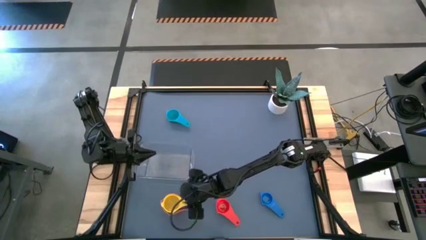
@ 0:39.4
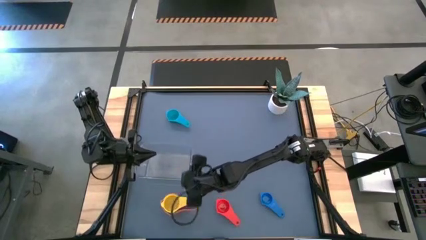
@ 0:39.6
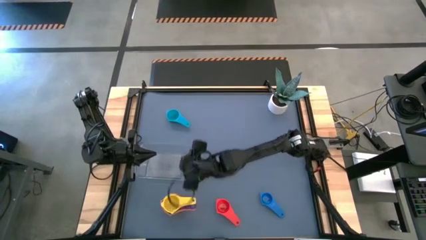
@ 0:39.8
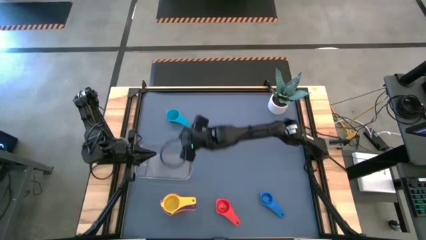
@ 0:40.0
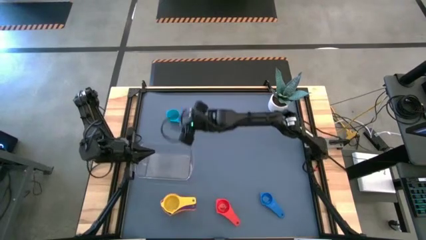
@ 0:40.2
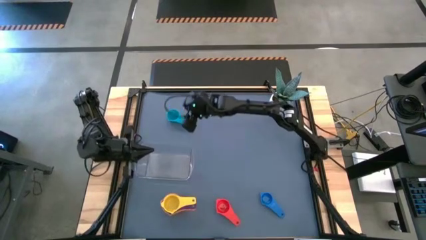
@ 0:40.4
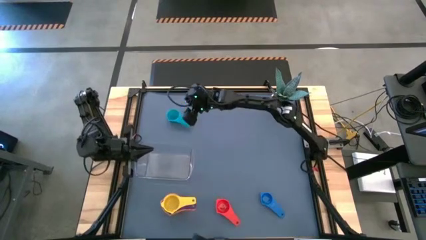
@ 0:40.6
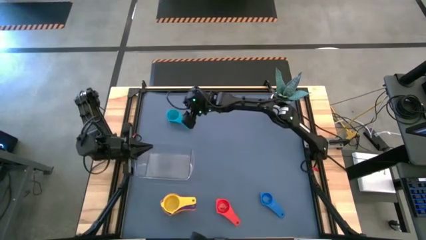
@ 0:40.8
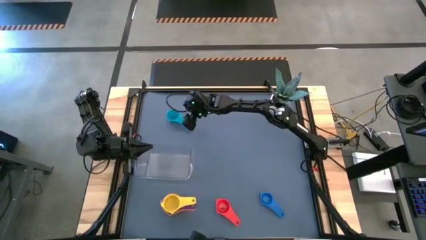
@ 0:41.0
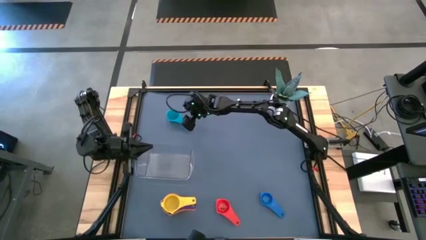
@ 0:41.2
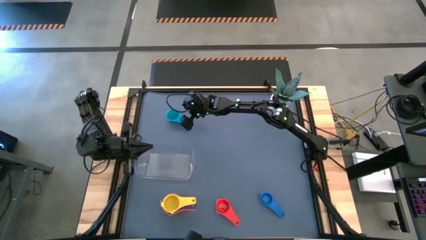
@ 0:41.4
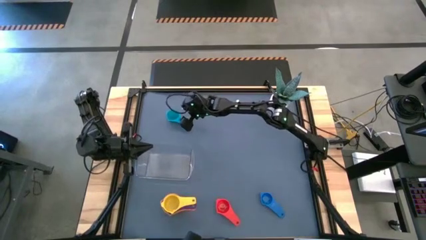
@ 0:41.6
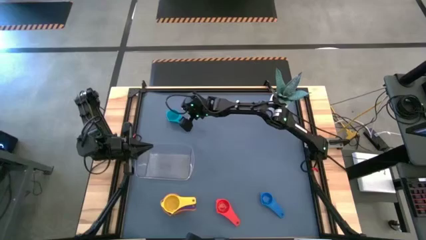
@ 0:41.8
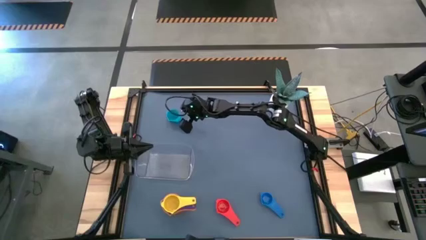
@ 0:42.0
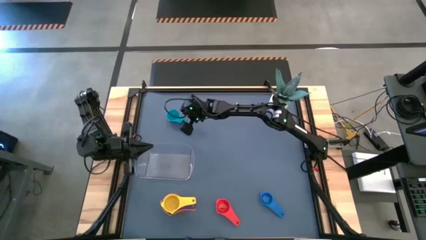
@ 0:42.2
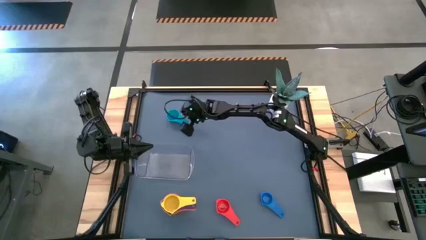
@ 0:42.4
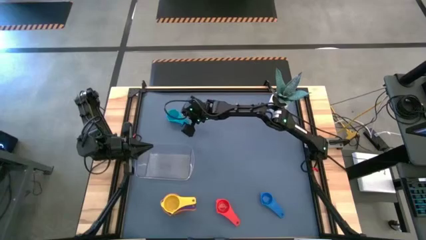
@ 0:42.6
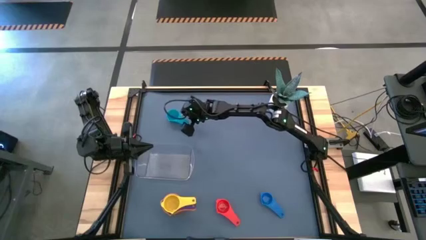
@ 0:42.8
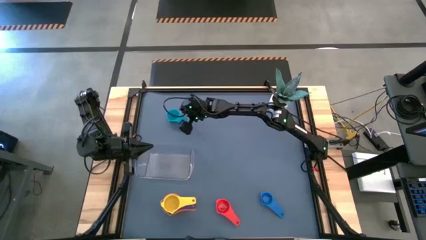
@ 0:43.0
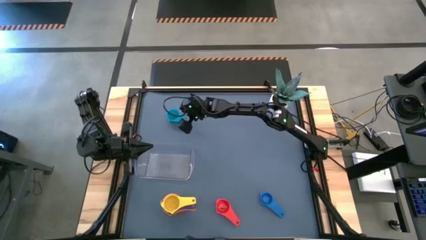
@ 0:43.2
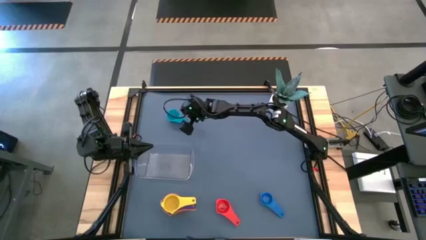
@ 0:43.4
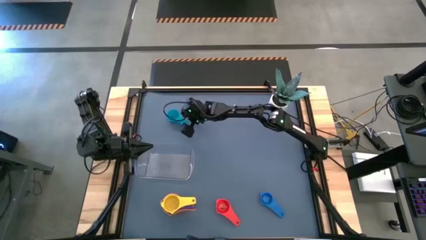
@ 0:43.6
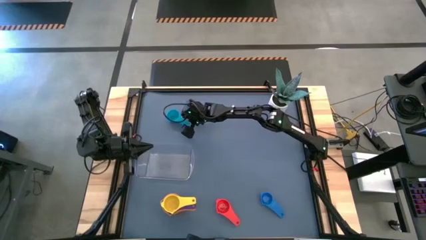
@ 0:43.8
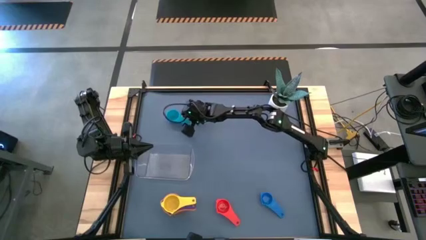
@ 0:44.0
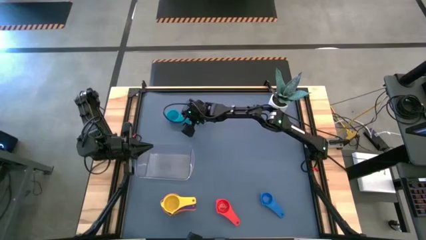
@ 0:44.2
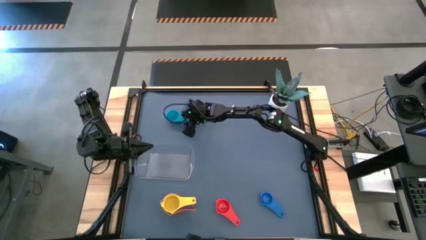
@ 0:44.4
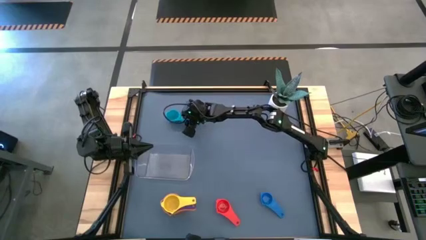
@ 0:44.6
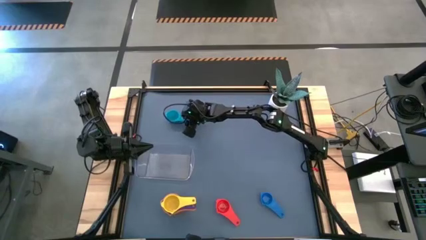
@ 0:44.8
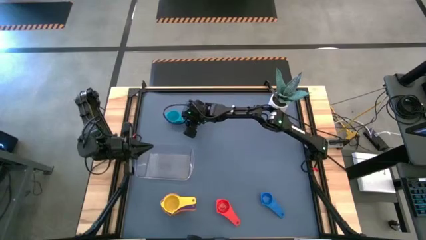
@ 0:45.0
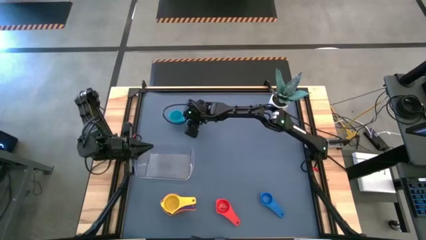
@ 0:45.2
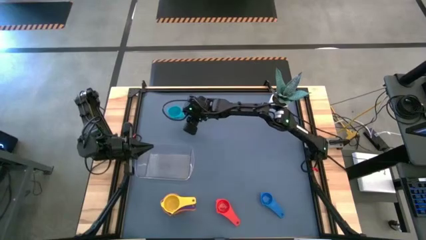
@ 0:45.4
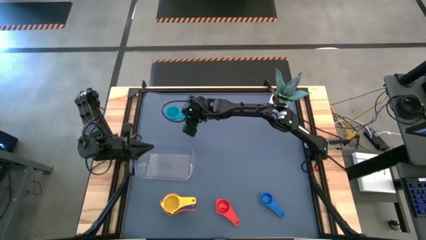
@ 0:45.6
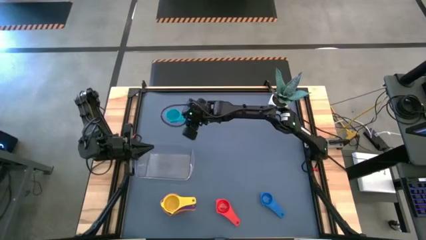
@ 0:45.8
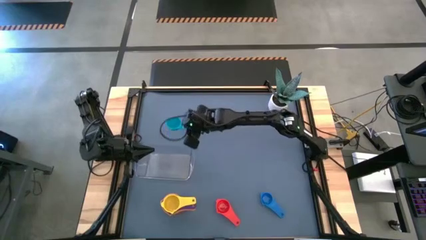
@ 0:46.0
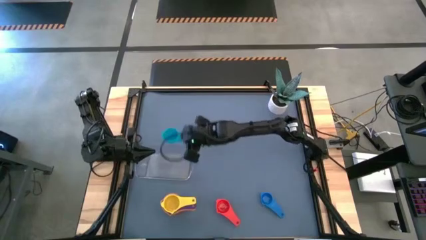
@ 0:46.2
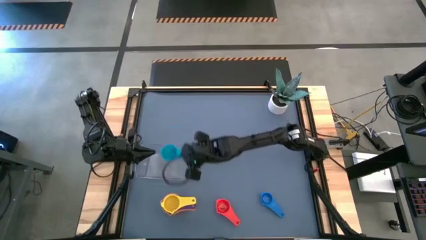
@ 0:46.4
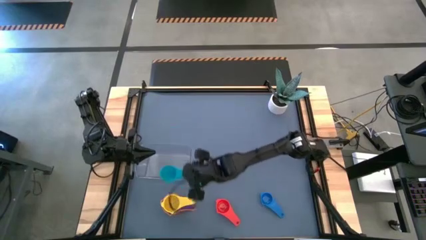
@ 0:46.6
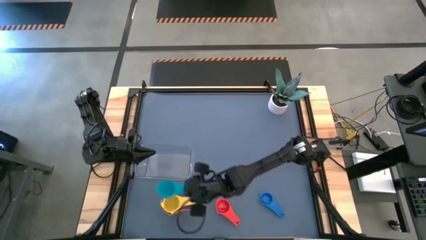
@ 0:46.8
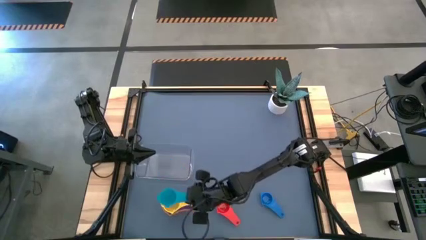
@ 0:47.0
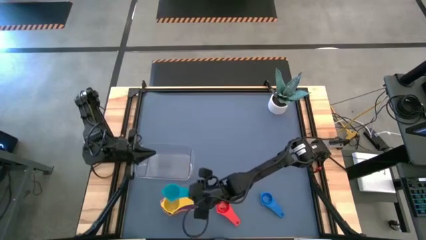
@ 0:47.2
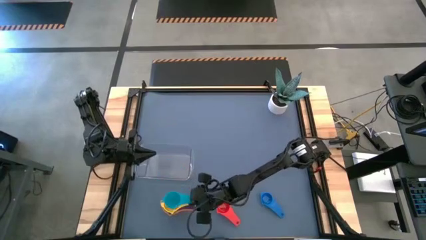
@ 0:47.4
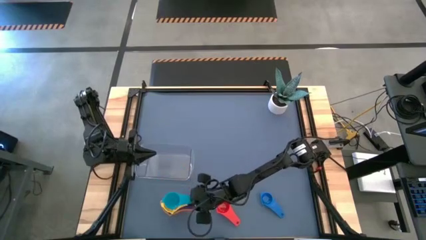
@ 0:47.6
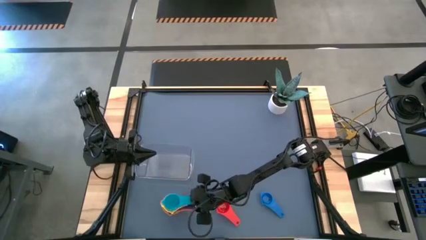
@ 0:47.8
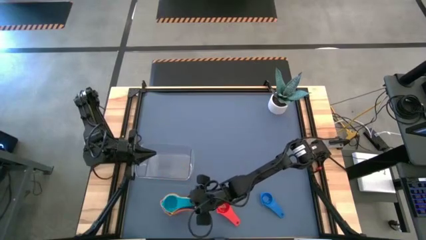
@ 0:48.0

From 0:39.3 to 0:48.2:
Task: Nest measuring cups in basket
Stack the light blue measuring cup on top of the yellow measuring cup

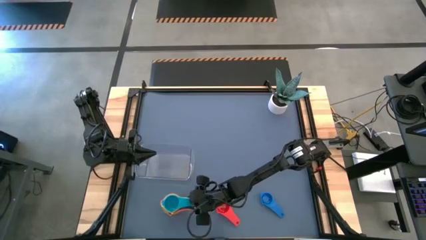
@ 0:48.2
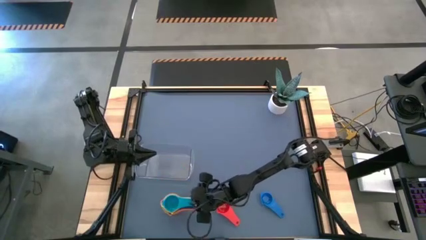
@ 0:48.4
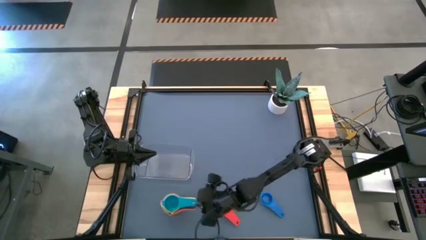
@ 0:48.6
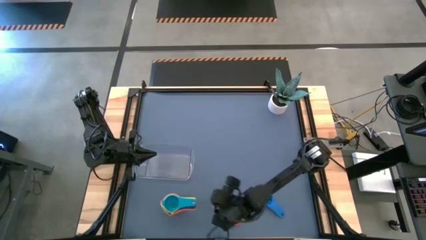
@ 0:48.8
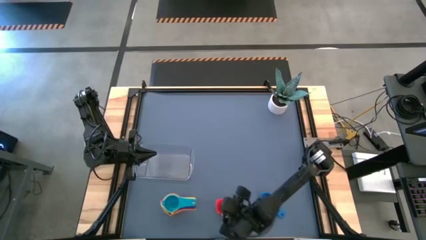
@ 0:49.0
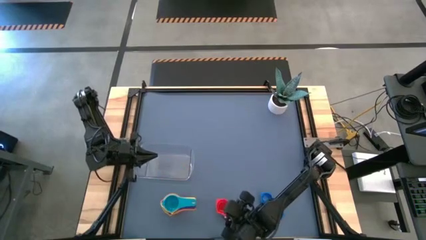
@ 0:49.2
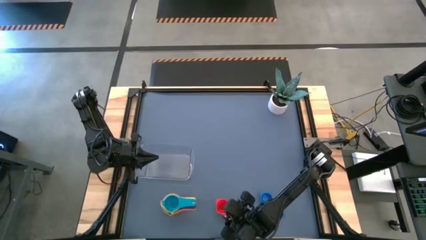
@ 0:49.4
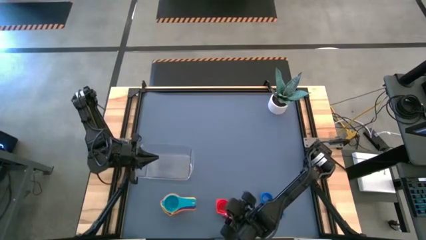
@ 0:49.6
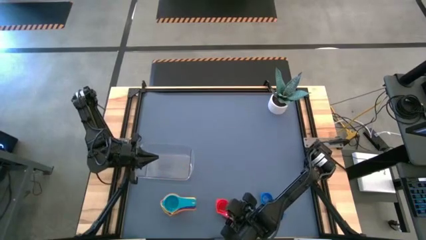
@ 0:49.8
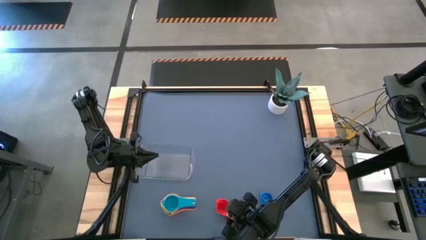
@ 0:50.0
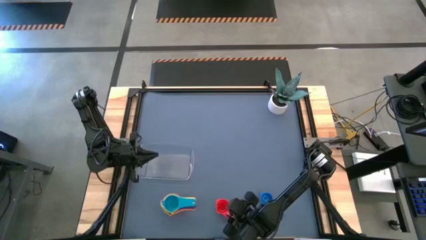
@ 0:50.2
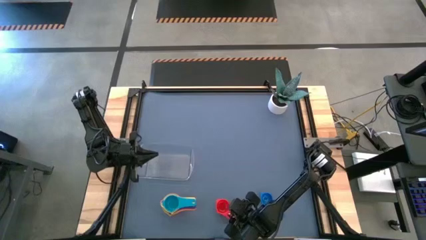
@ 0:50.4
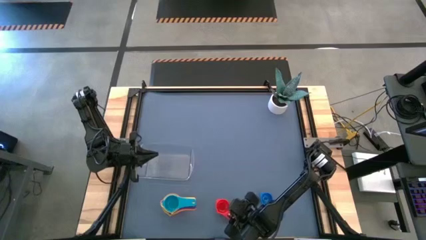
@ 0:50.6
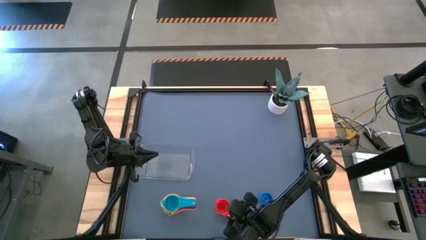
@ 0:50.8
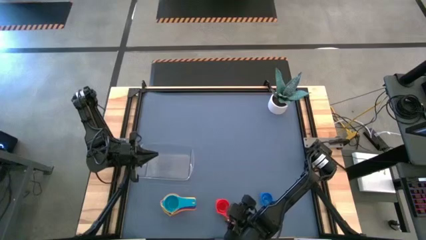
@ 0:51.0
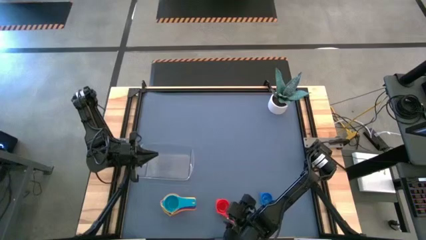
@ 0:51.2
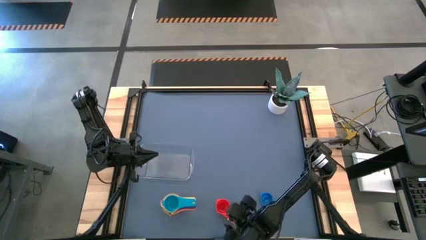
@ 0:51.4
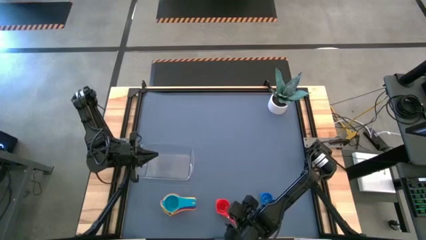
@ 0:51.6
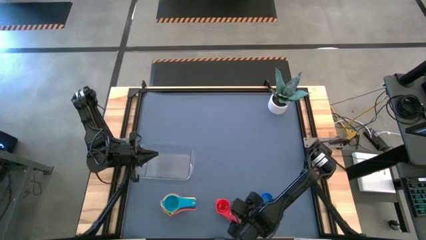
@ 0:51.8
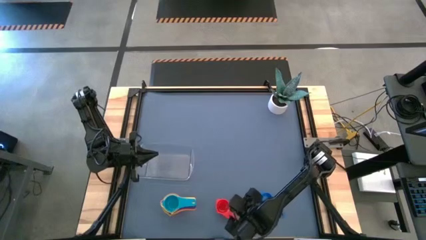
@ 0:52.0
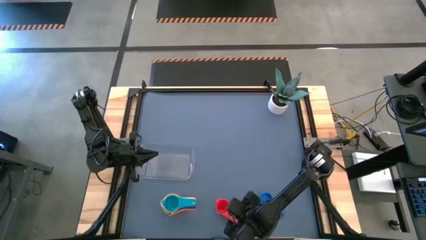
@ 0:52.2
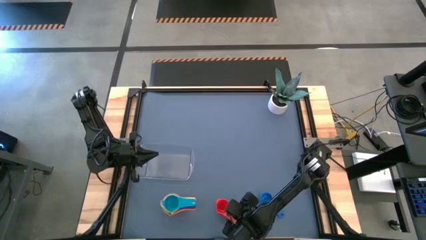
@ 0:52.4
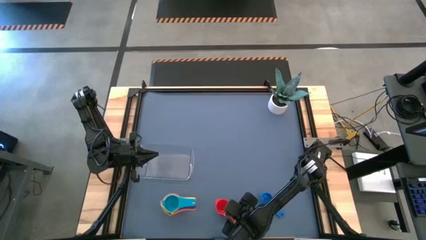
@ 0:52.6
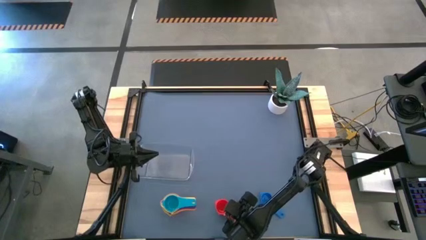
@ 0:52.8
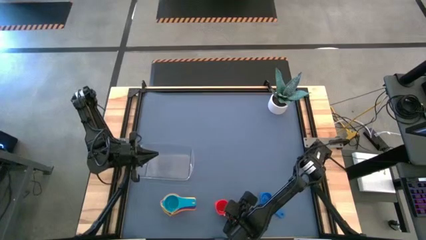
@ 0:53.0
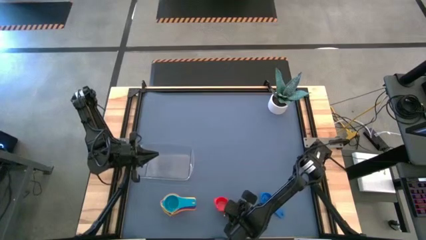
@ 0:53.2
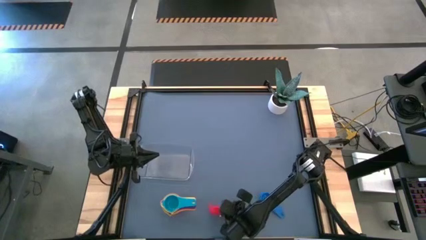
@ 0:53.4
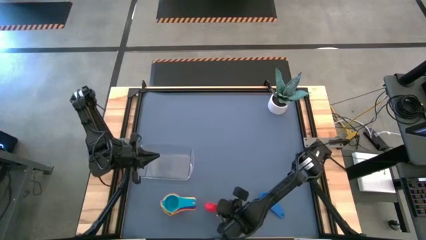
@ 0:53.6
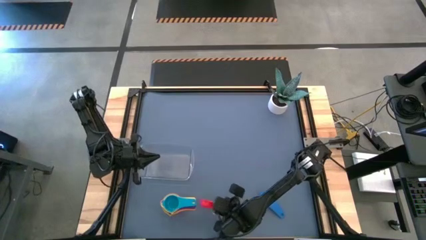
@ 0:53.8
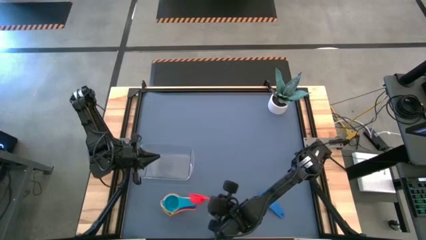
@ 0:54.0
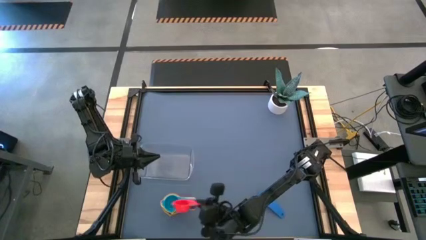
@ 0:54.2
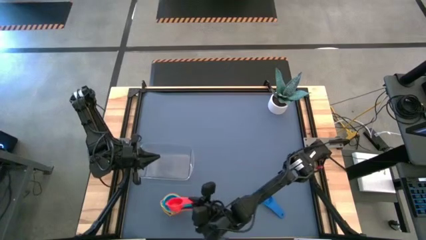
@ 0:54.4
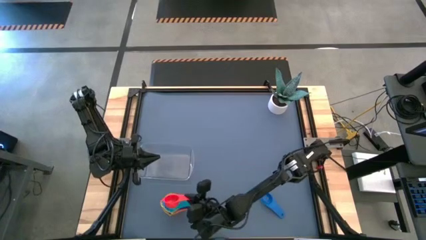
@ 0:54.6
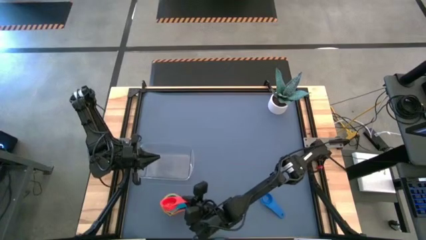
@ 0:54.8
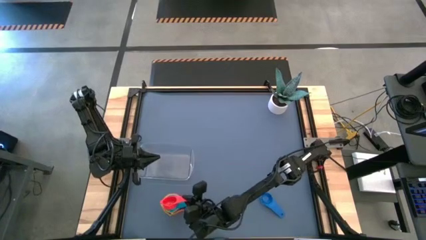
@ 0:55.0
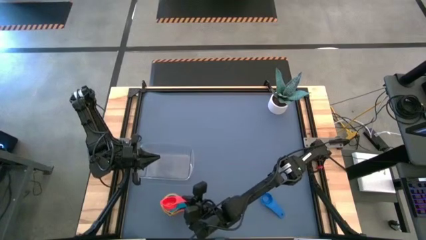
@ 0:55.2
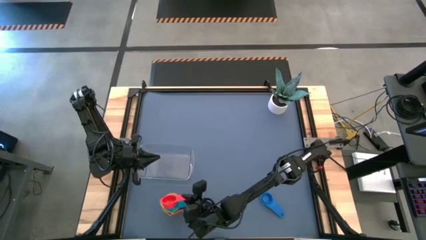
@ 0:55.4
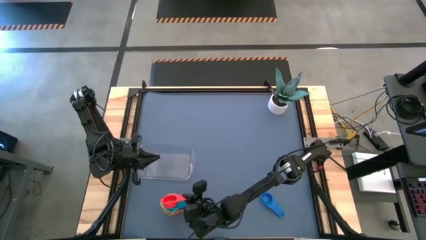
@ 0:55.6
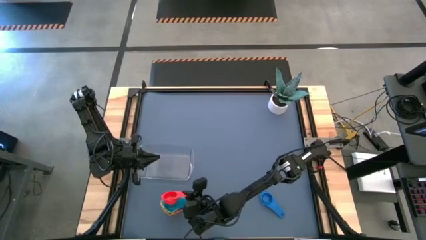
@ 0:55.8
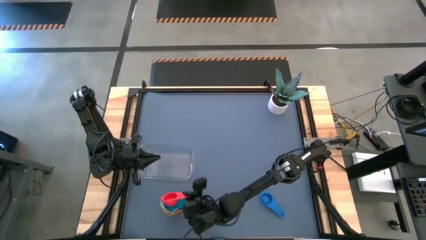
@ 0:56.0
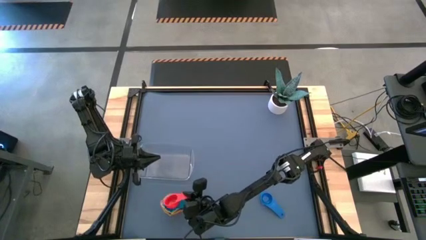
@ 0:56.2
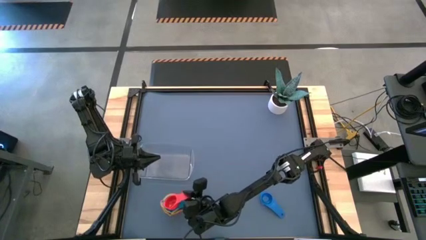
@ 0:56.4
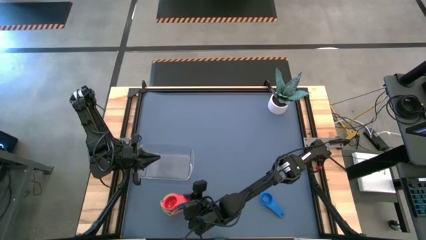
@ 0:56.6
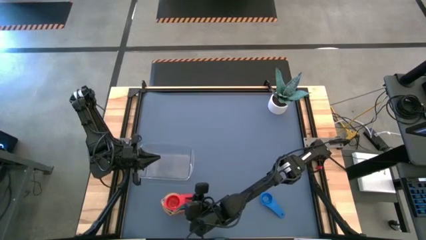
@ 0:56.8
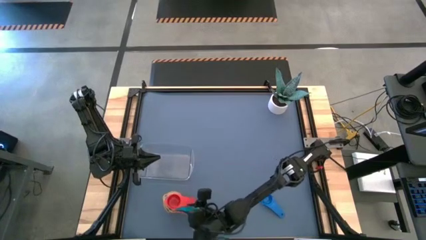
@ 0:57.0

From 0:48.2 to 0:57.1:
Stack the orange measuring cup on top of the light blue measuring cup
